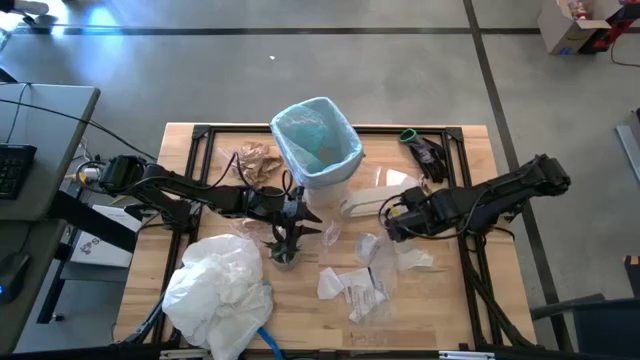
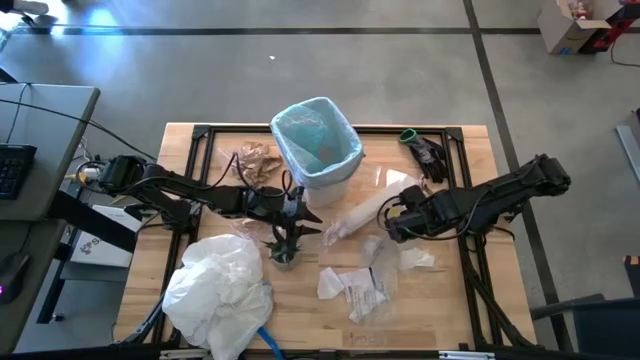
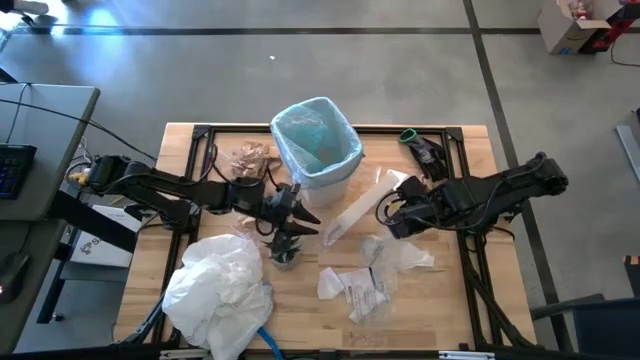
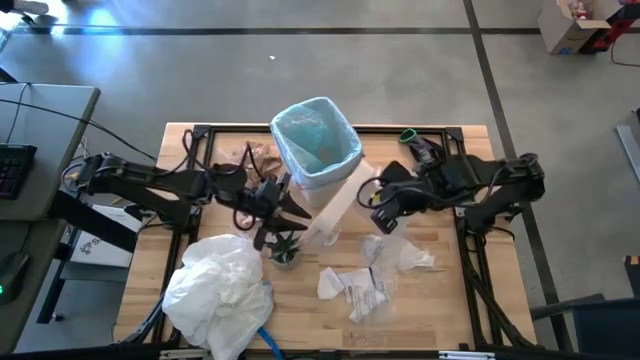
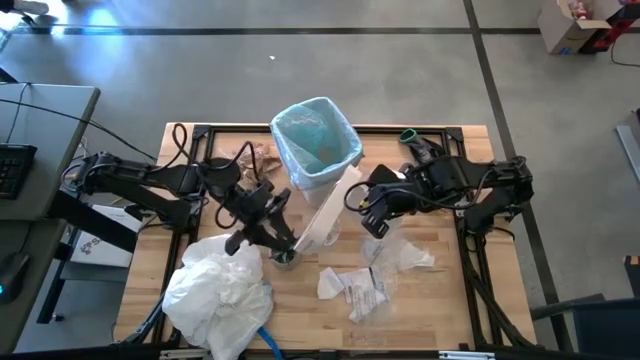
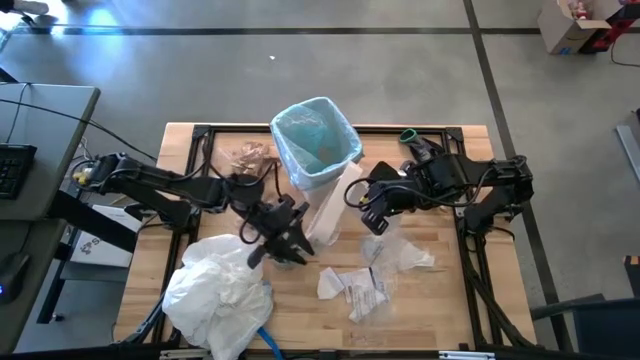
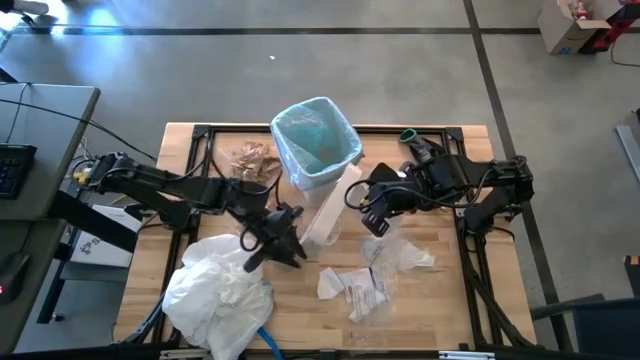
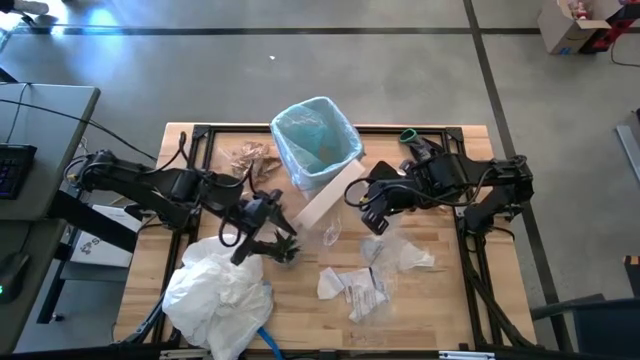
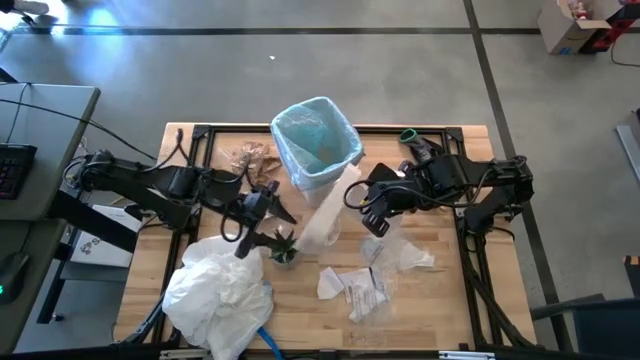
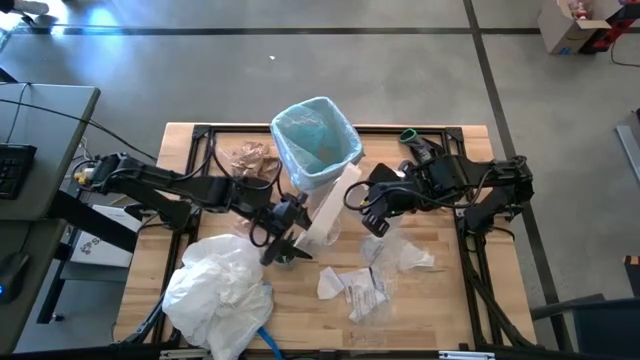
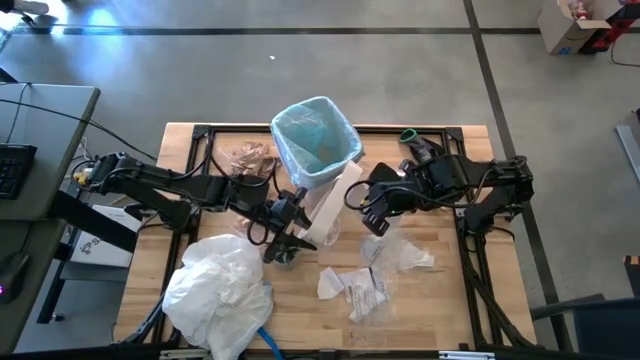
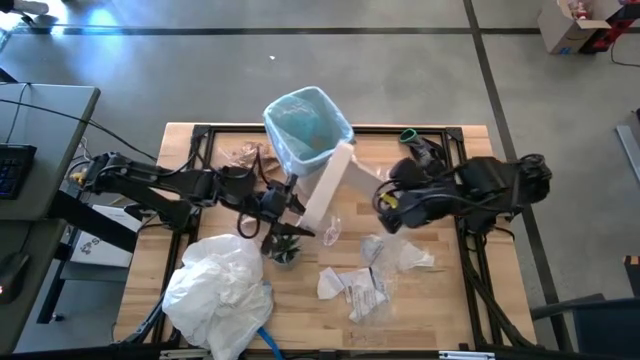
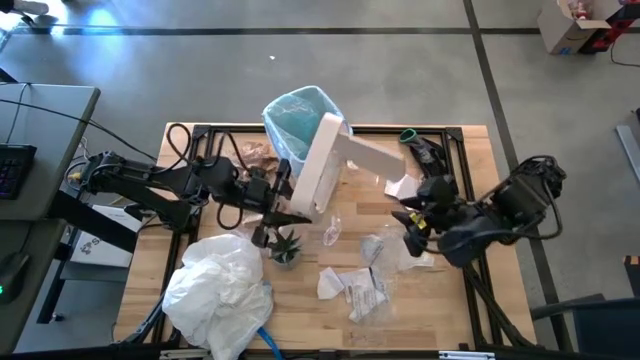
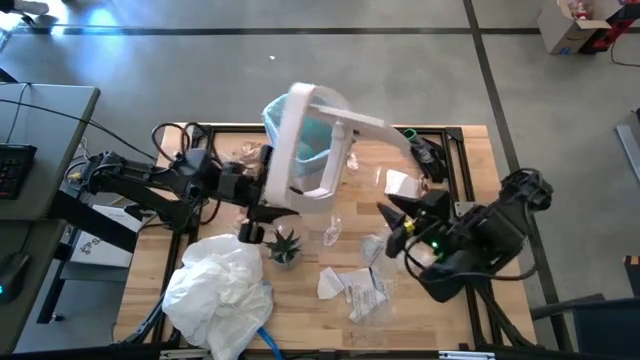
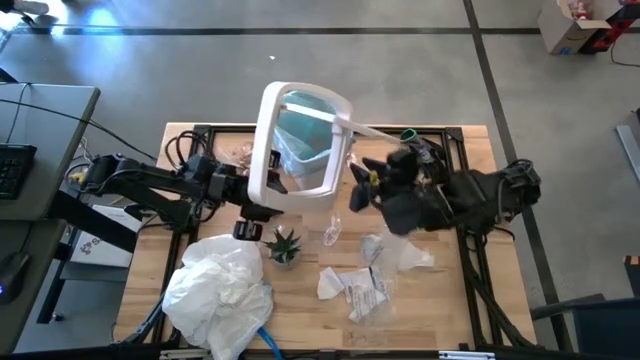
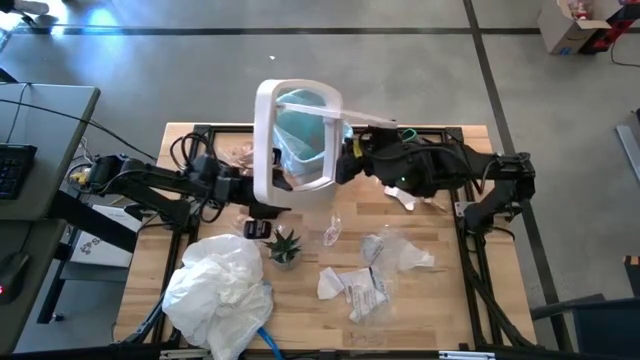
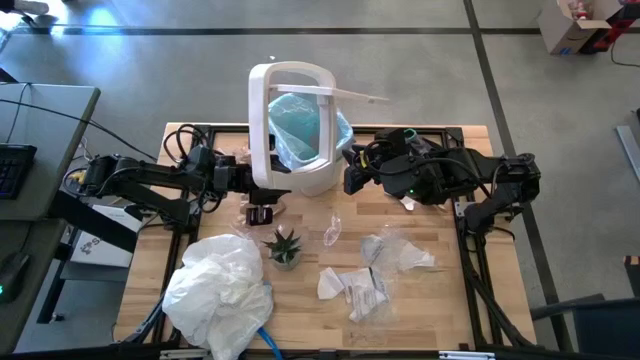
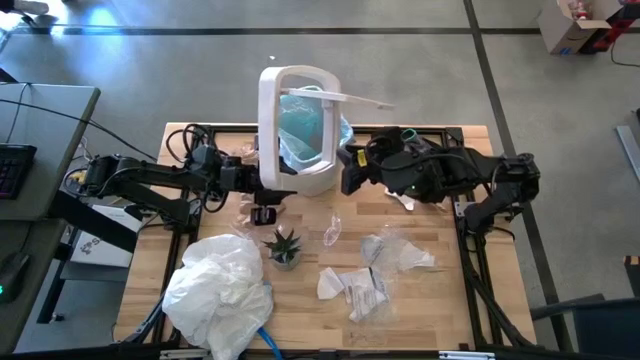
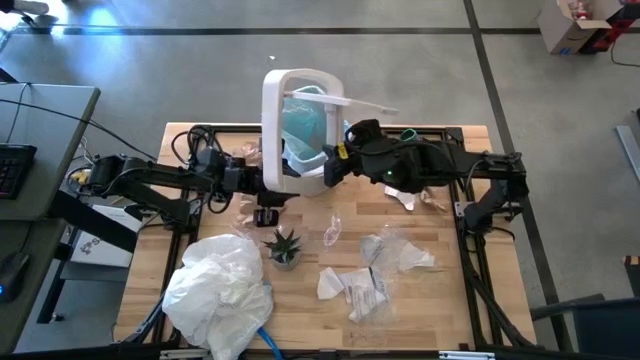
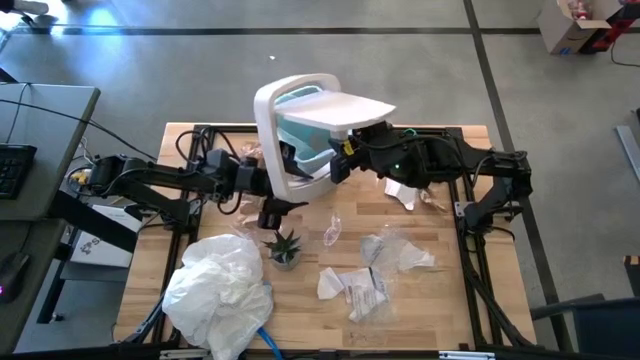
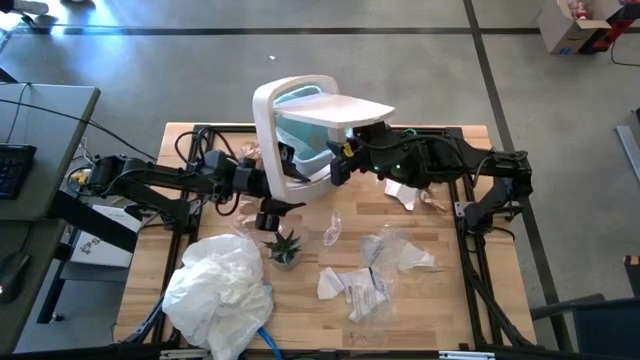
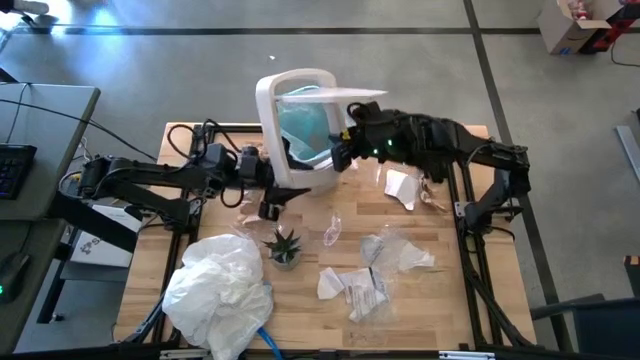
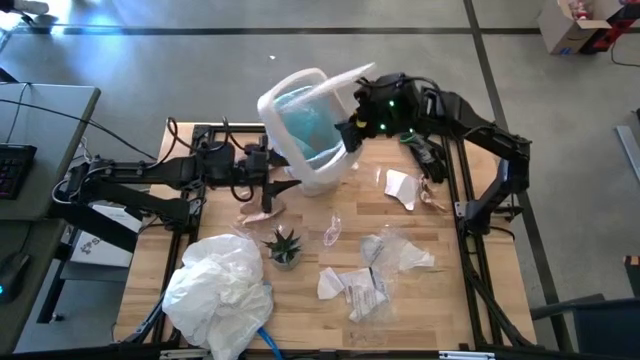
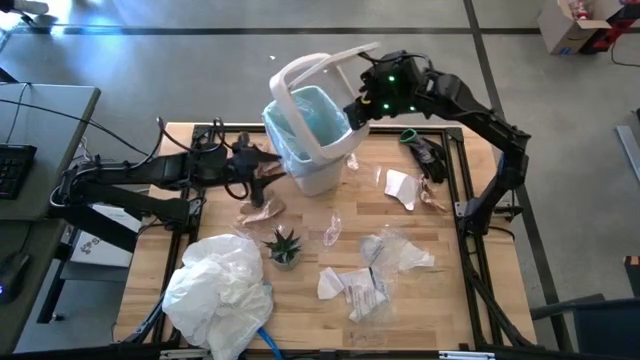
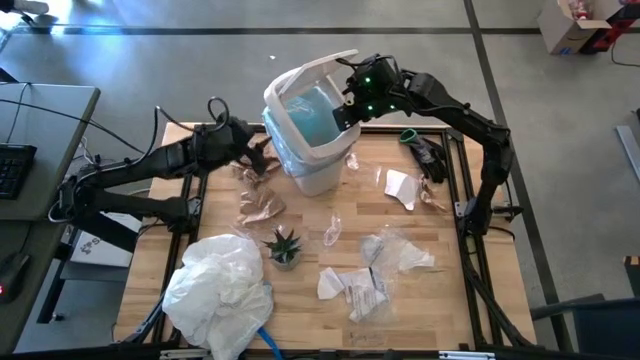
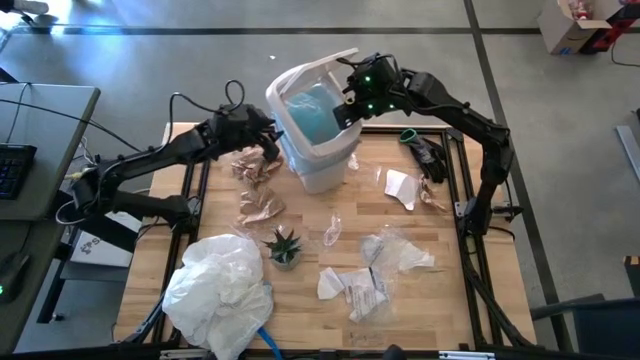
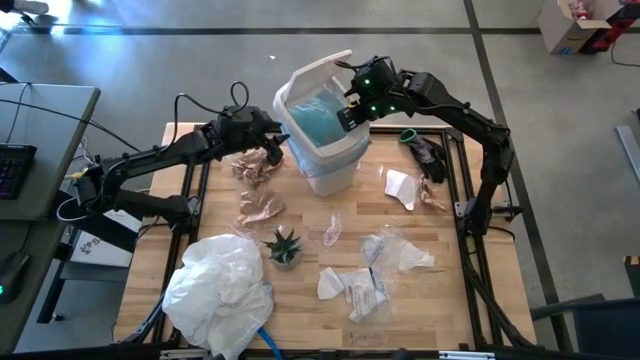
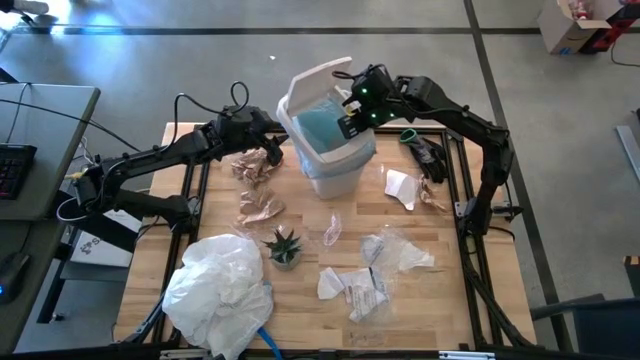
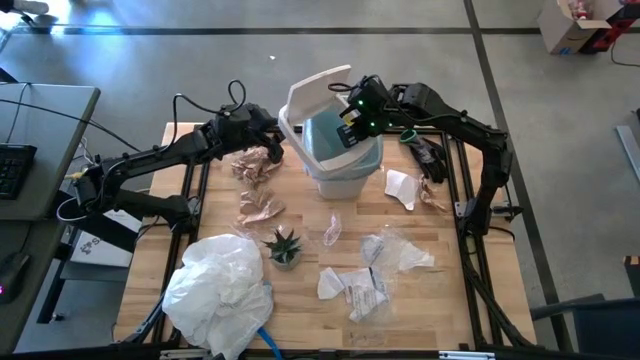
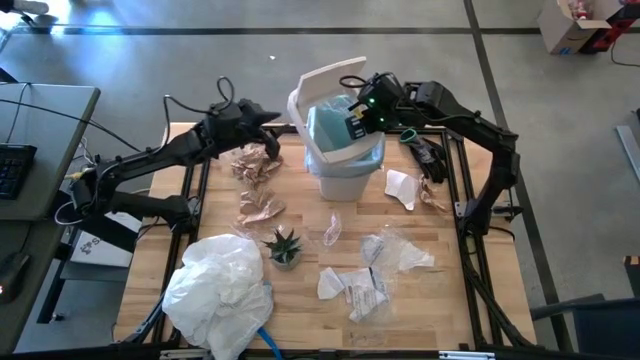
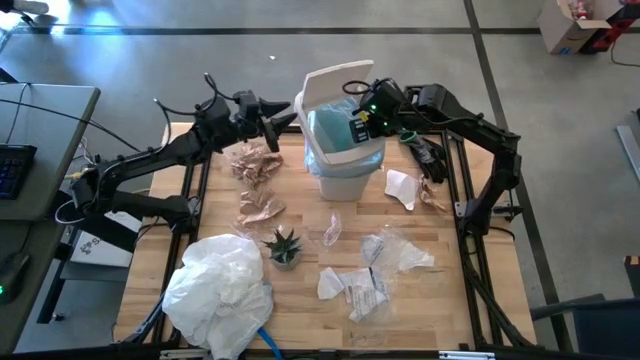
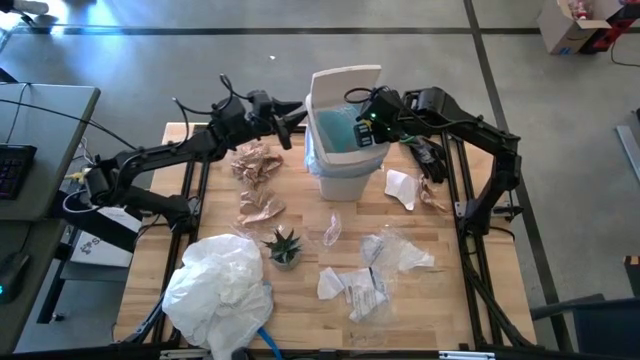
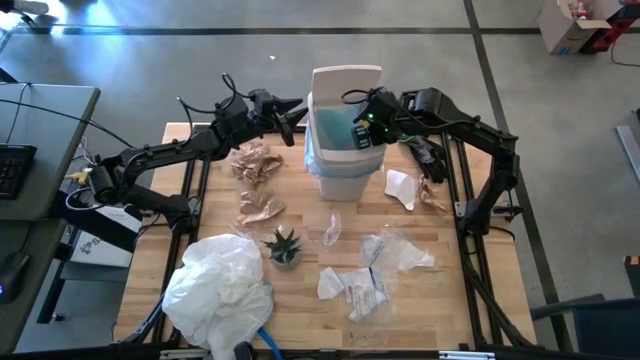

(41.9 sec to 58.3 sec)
Task: place trash/remove bag and relplace
Adjust the trash bin

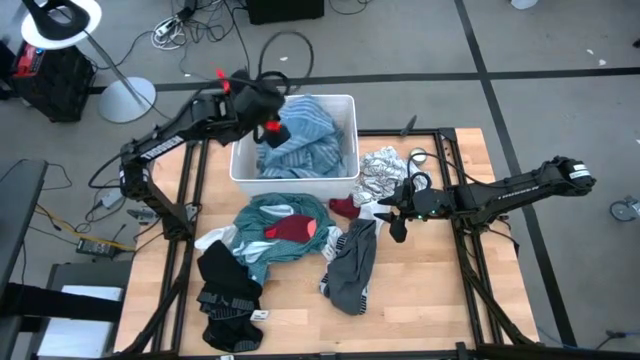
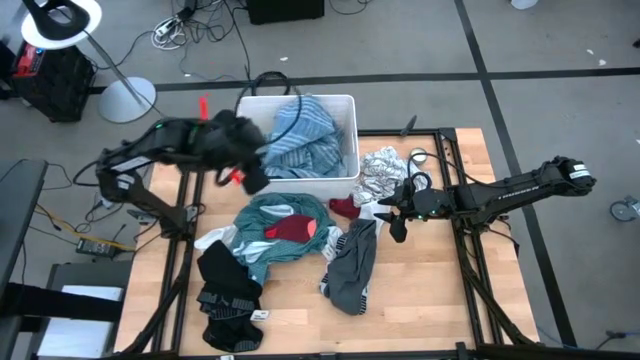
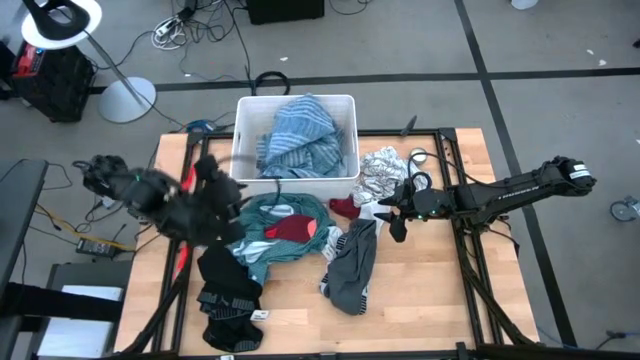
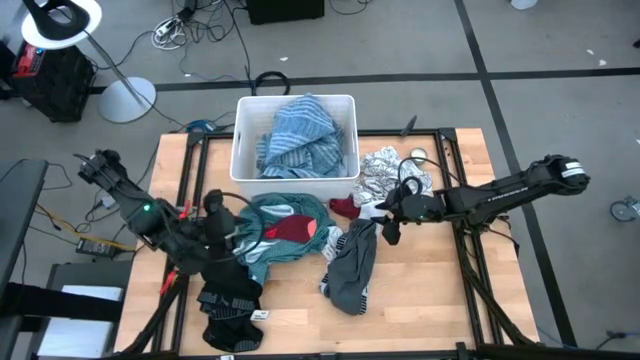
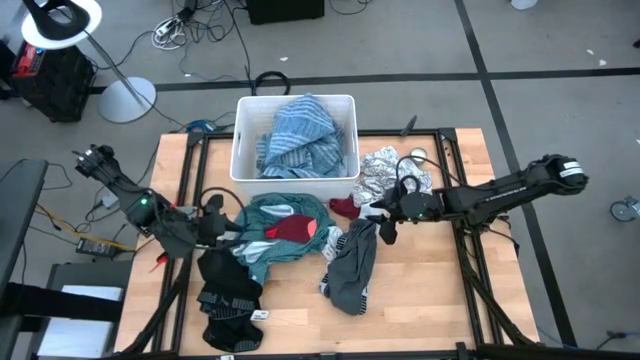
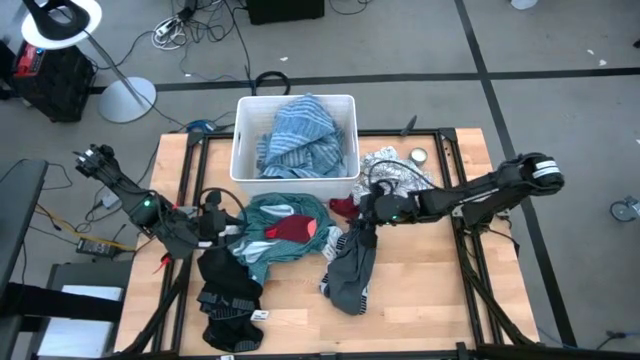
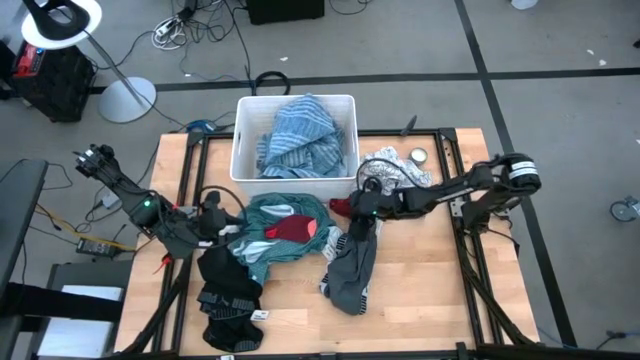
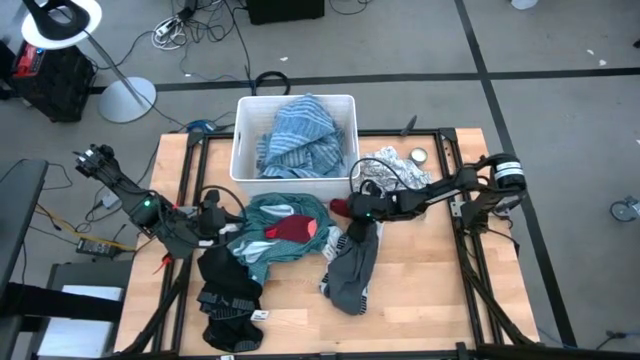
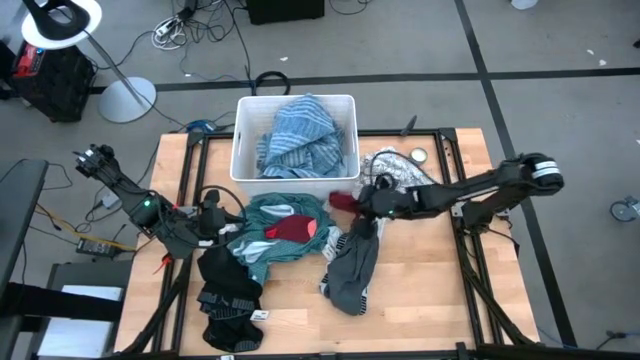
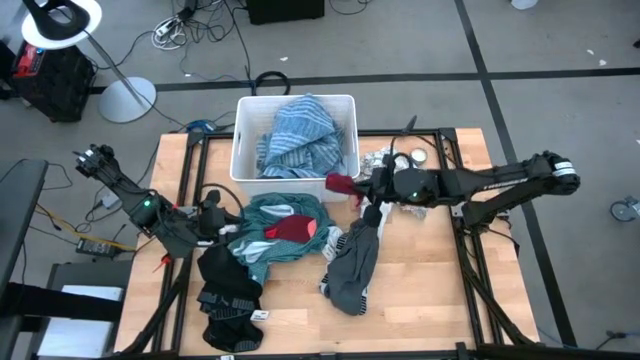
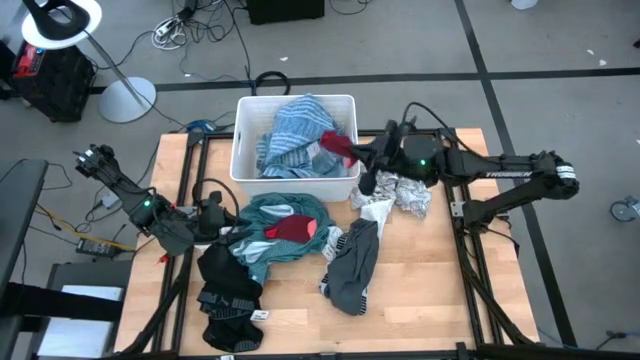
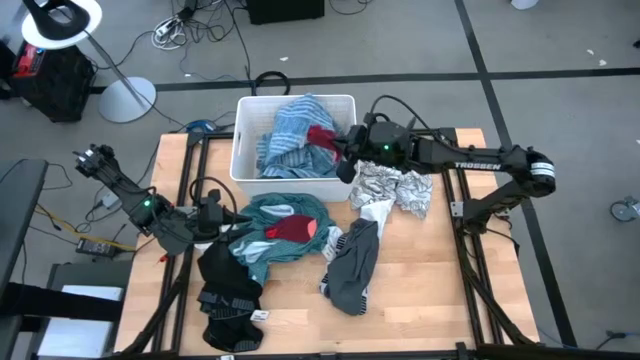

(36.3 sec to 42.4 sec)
Task: Sort clothes
Put the red sock into the white laundry bin
